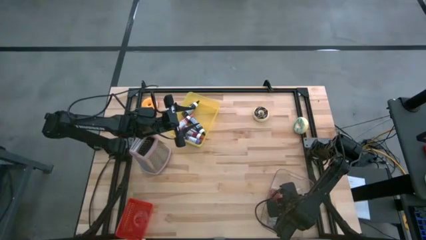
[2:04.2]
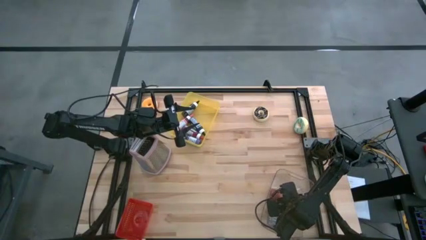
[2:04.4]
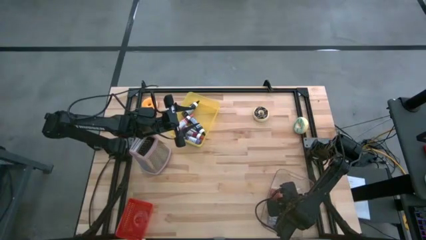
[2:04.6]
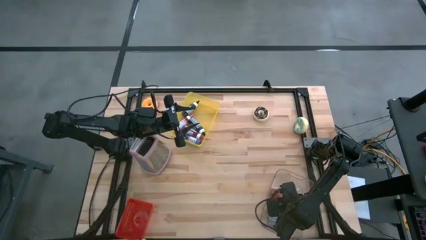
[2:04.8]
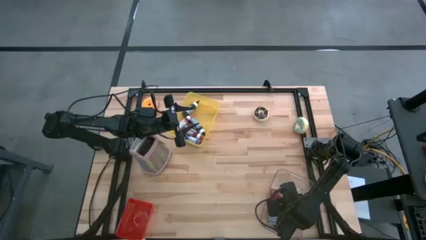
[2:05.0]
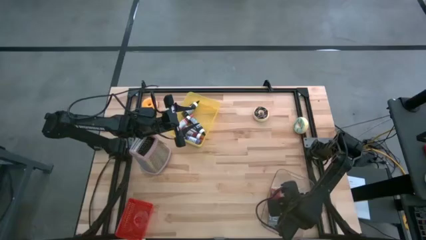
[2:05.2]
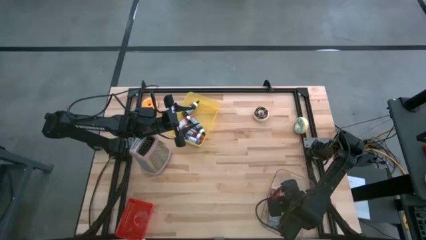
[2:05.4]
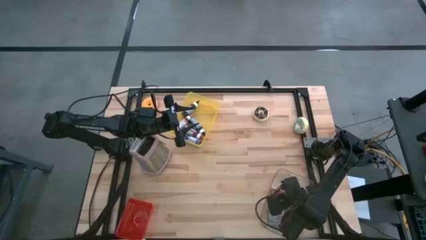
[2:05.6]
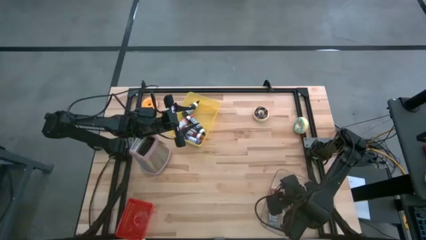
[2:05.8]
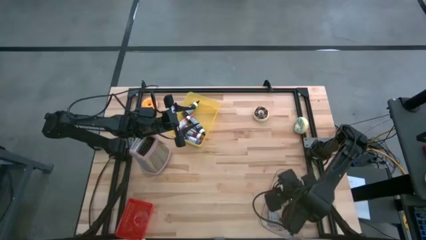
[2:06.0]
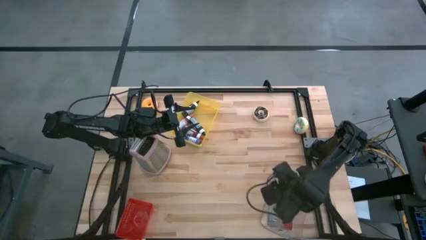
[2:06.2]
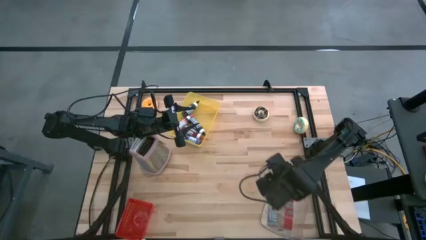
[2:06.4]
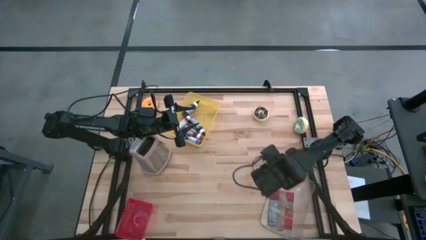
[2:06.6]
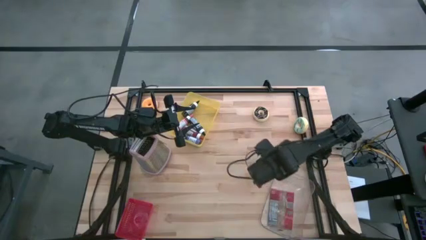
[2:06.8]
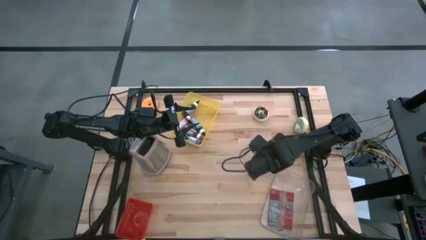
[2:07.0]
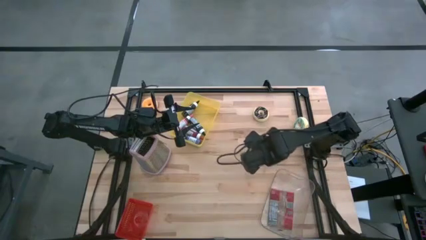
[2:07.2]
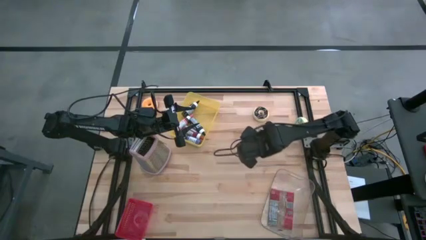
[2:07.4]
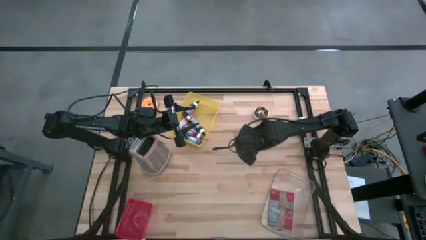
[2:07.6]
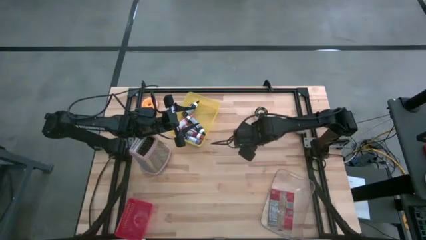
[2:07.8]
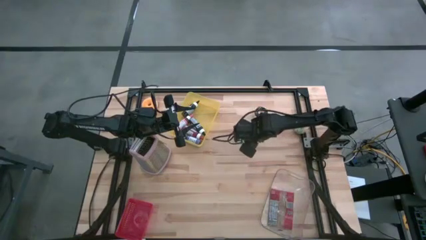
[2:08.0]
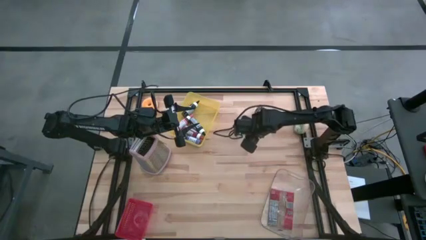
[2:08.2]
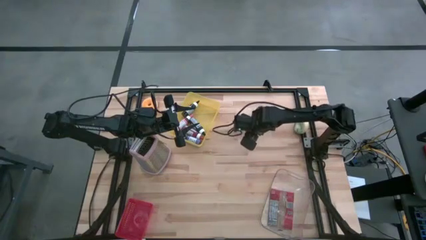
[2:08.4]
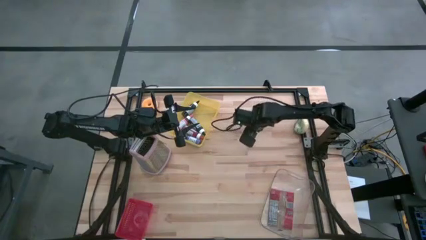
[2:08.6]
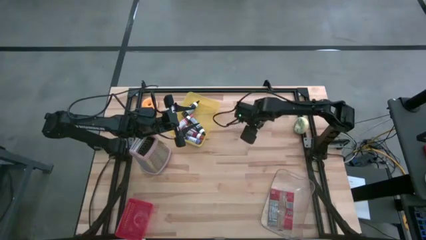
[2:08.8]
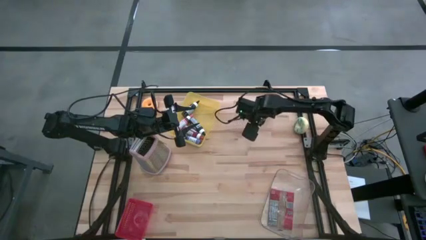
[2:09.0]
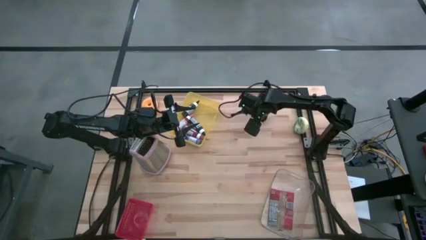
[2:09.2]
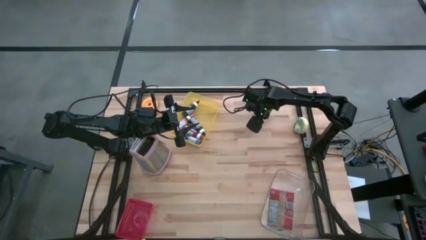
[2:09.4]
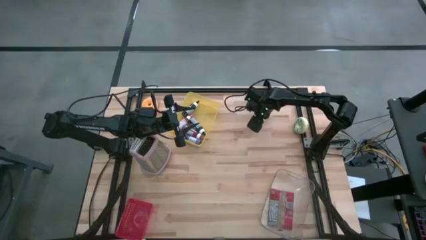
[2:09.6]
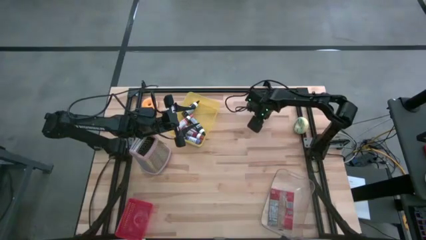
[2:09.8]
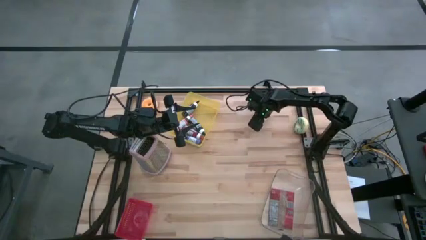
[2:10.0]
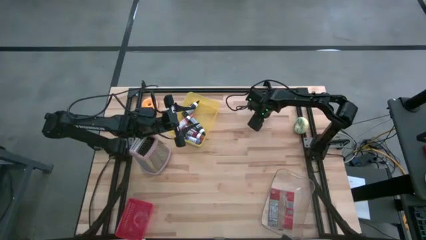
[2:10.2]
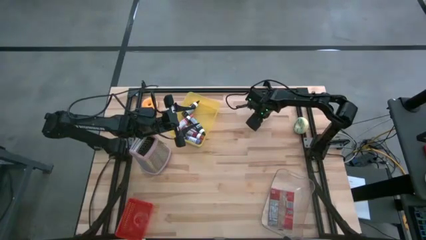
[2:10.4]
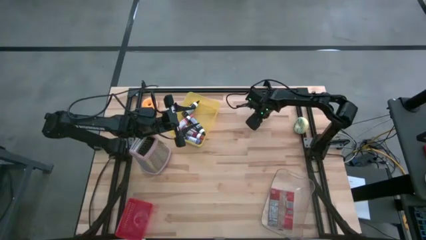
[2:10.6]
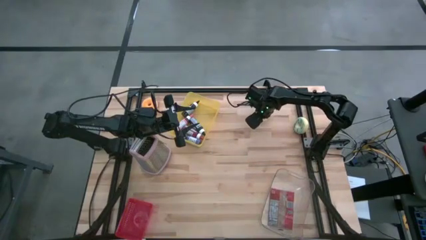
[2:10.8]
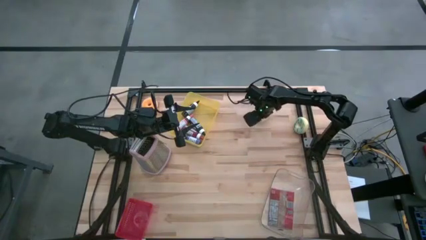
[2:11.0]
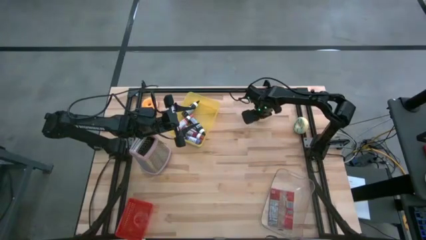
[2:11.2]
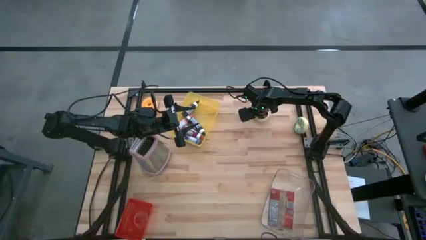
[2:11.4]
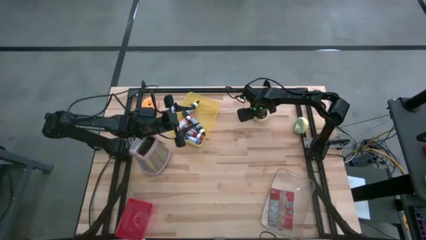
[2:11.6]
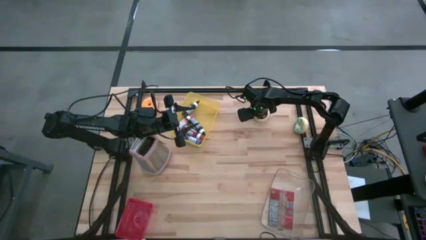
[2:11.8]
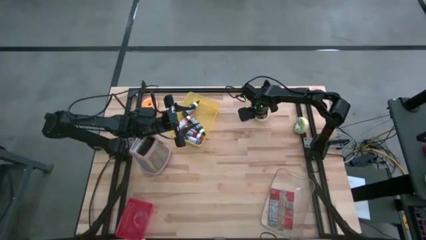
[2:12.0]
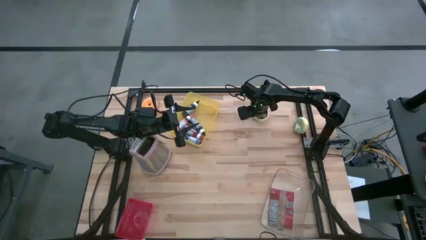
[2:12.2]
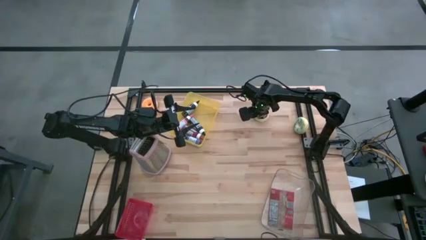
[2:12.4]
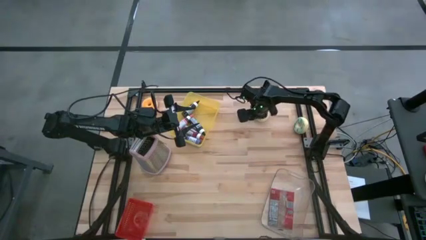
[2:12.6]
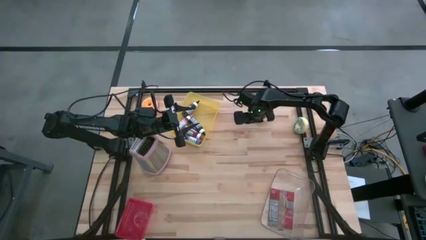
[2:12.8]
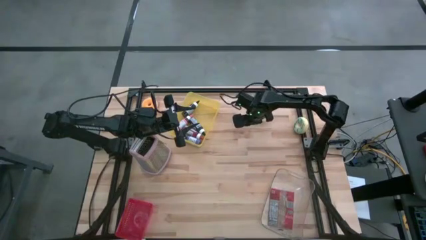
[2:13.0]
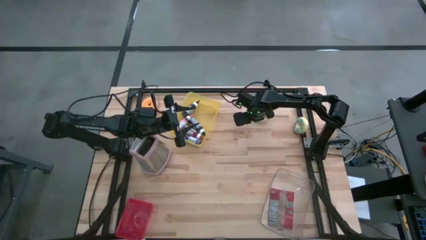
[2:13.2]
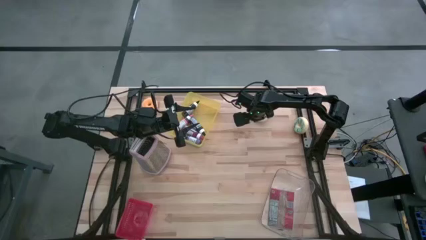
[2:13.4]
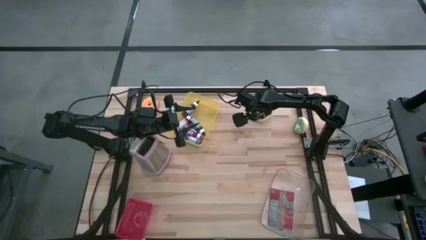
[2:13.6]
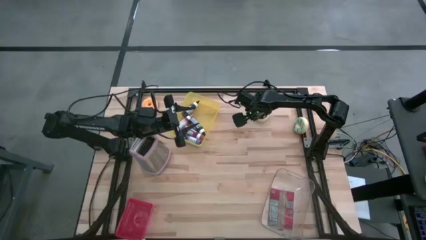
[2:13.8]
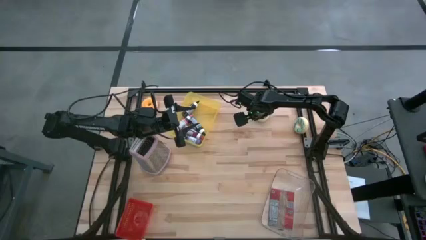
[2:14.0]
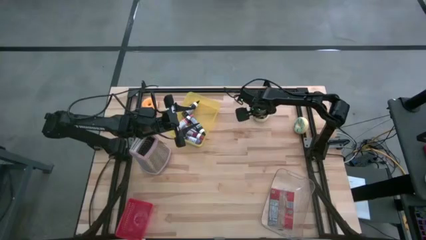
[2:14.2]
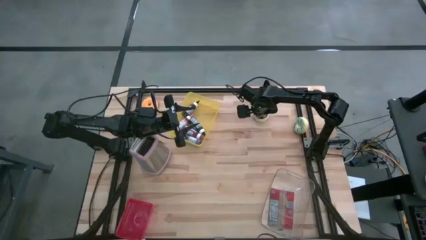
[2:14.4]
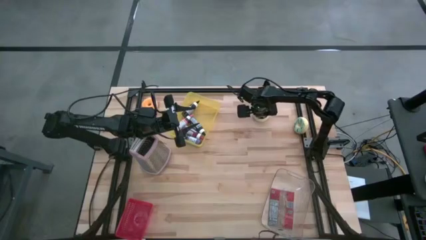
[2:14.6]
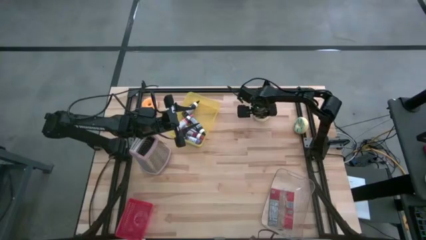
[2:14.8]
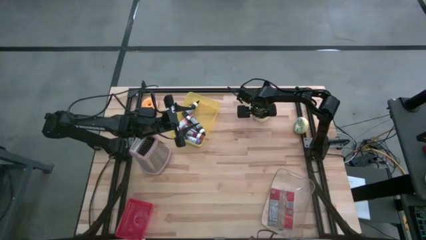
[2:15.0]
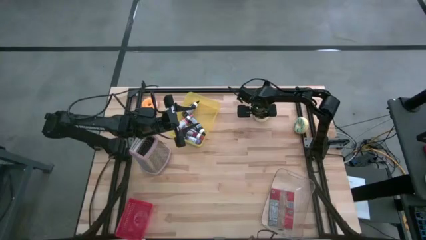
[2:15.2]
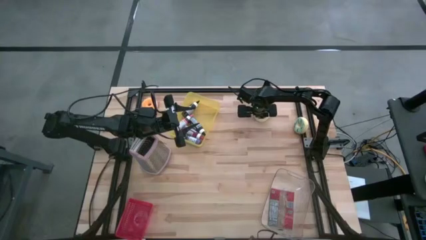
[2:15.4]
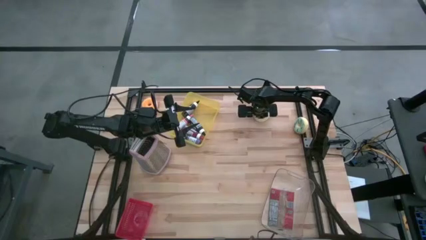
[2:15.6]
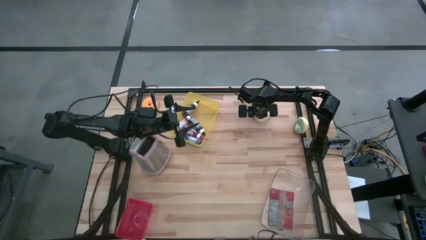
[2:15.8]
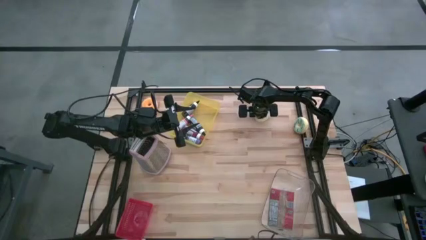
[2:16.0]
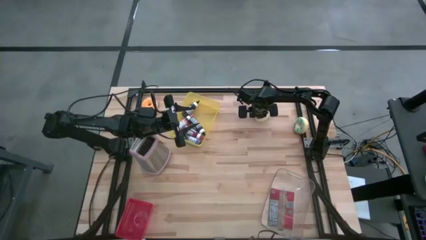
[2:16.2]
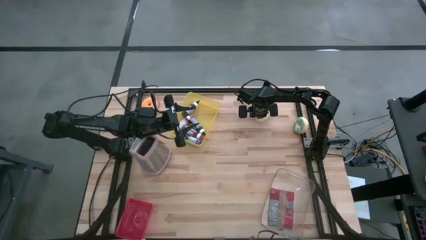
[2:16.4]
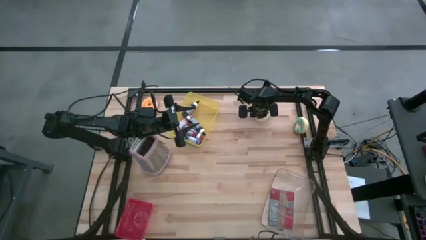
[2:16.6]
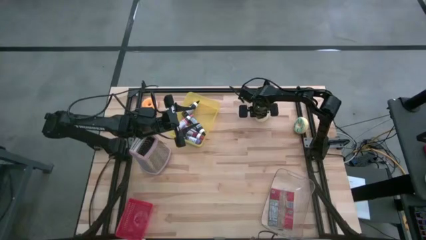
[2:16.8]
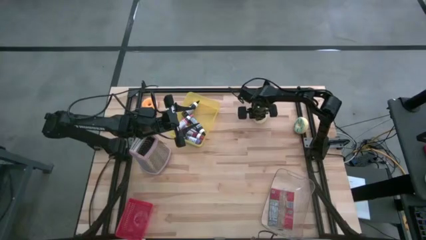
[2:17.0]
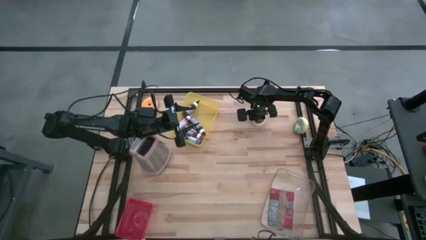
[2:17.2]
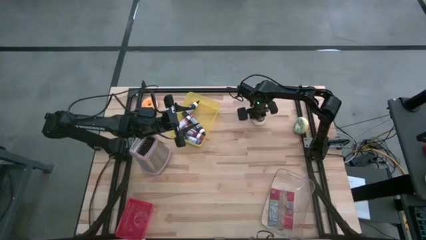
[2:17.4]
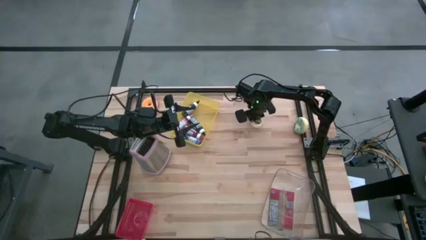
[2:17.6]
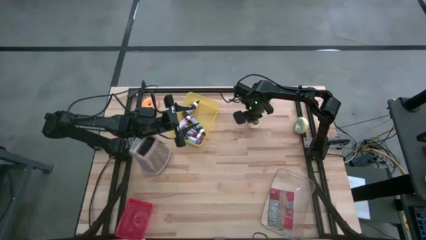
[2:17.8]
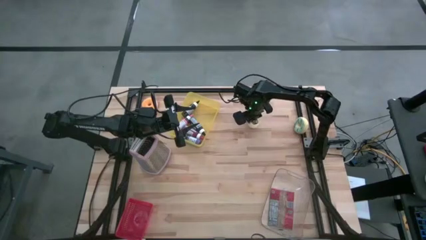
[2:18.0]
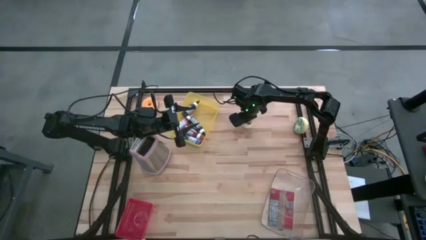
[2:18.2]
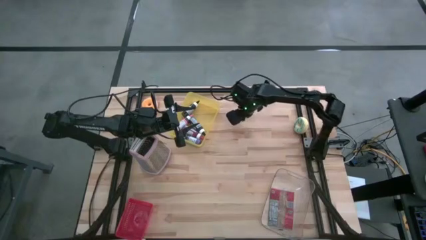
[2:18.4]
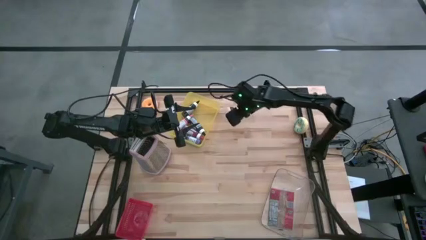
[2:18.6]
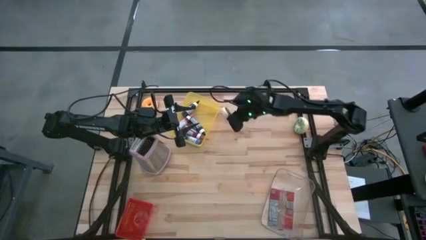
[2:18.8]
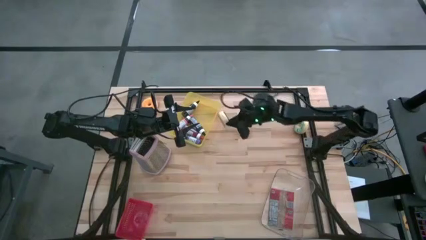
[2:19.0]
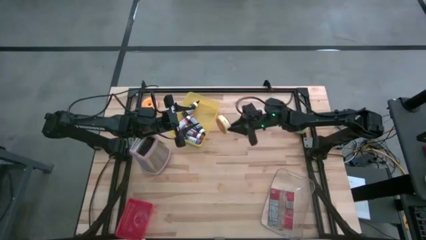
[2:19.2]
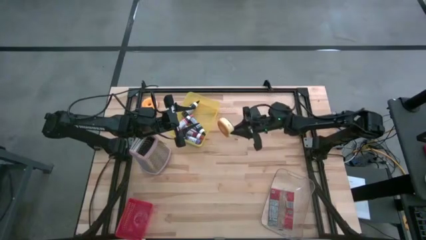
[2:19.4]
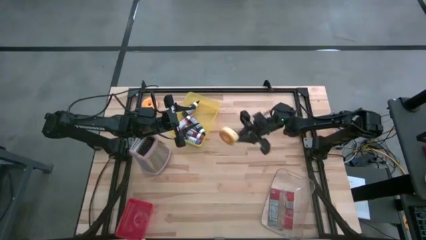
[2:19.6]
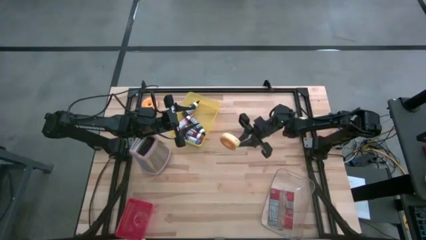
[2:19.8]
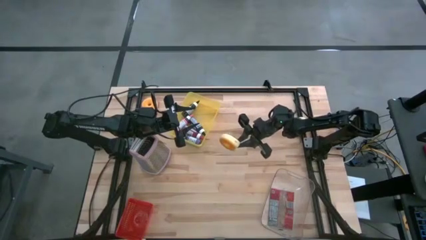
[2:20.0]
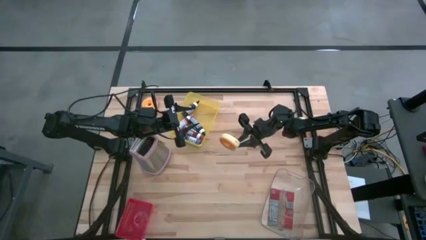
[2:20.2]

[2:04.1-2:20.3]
Task: Pick & Place Food Item
Put the black donut into the red bin
